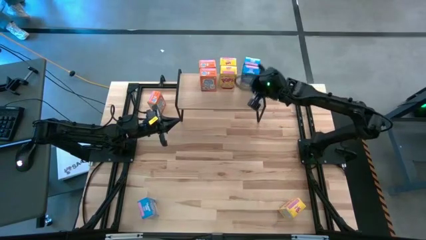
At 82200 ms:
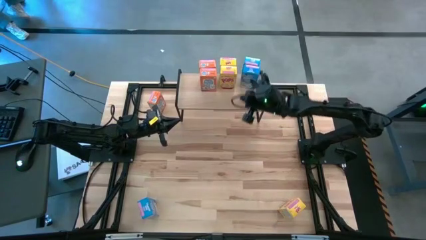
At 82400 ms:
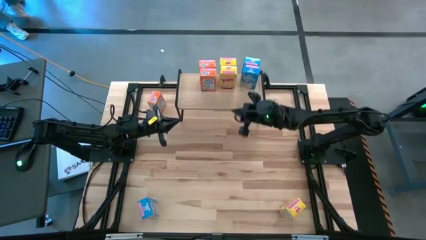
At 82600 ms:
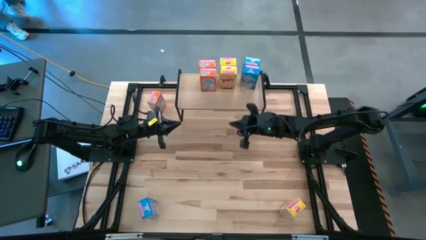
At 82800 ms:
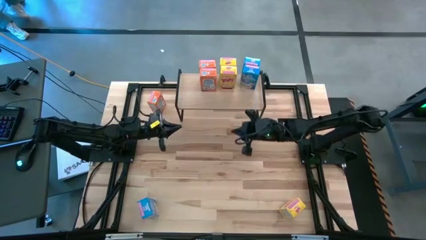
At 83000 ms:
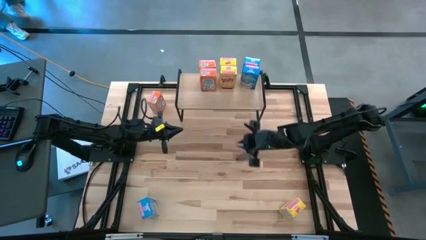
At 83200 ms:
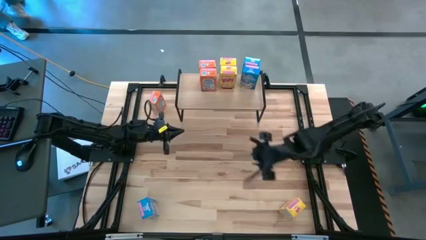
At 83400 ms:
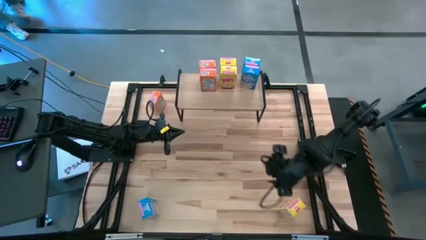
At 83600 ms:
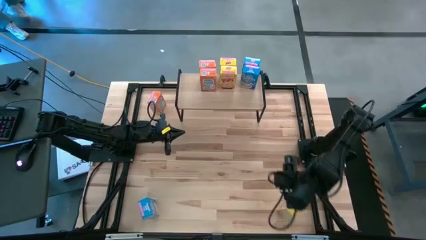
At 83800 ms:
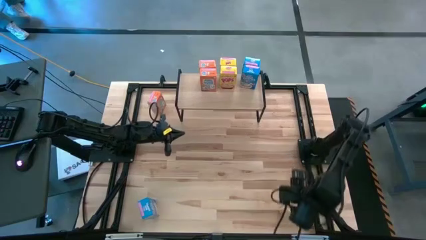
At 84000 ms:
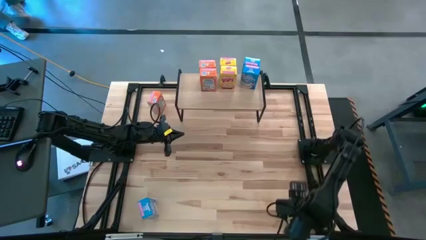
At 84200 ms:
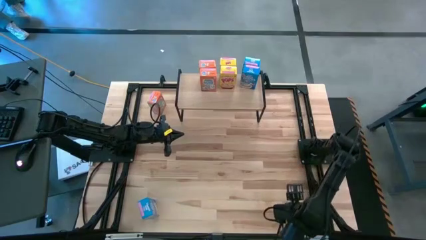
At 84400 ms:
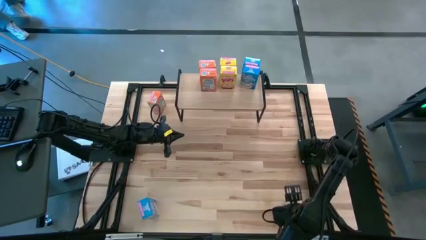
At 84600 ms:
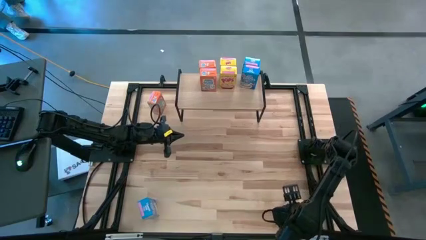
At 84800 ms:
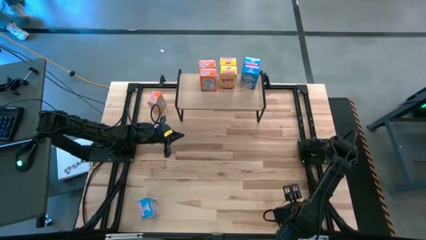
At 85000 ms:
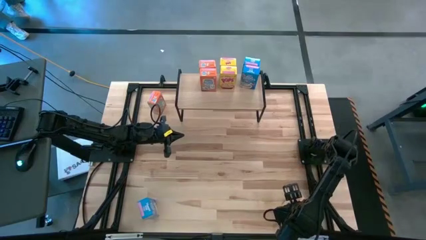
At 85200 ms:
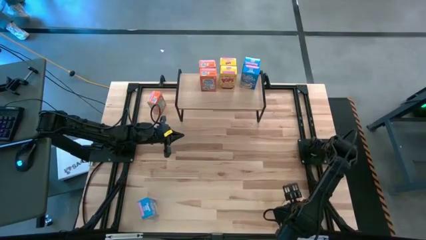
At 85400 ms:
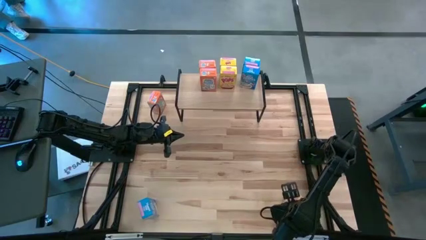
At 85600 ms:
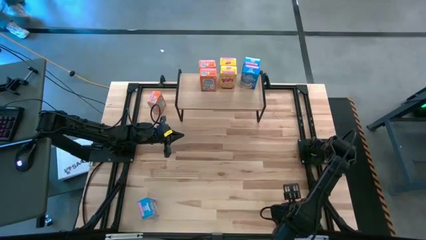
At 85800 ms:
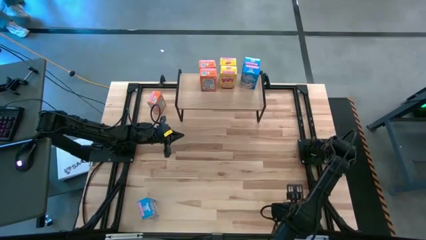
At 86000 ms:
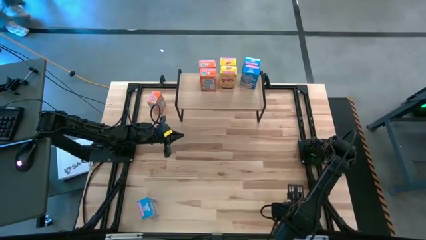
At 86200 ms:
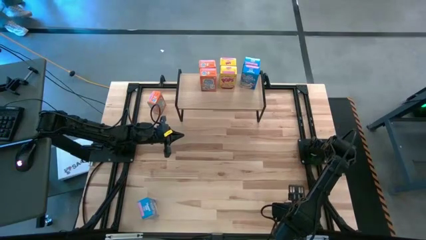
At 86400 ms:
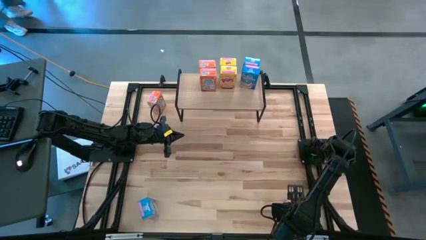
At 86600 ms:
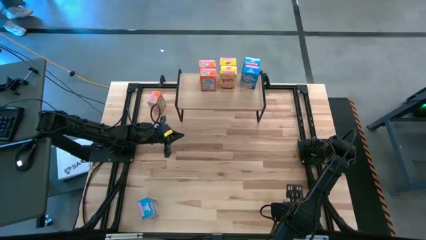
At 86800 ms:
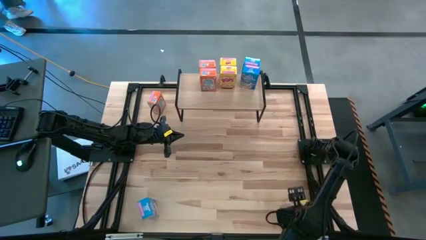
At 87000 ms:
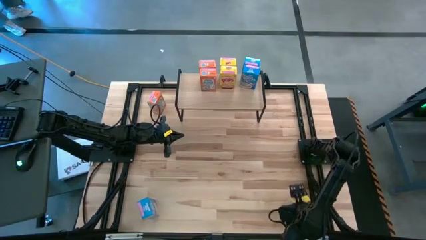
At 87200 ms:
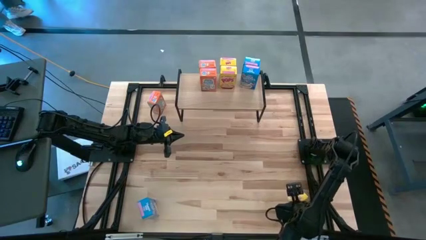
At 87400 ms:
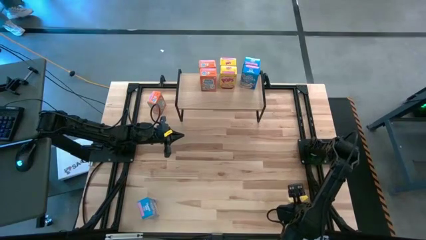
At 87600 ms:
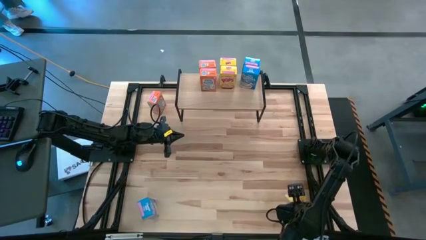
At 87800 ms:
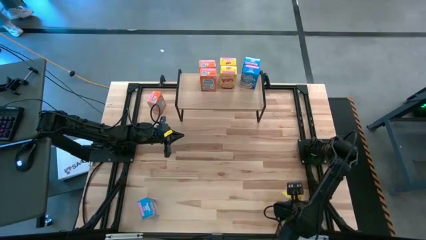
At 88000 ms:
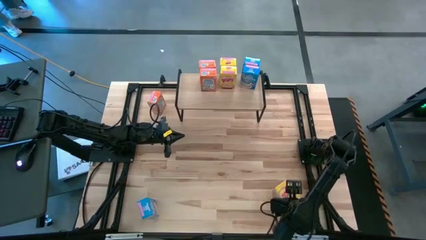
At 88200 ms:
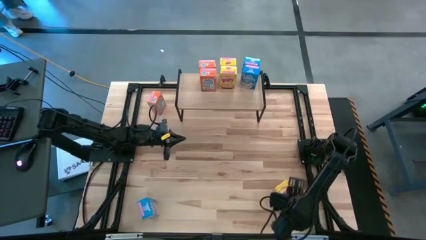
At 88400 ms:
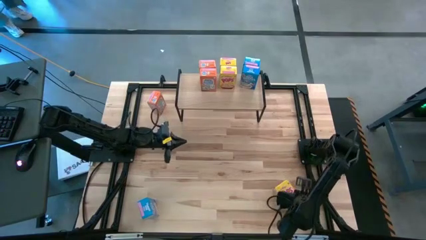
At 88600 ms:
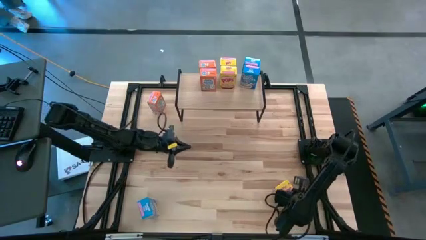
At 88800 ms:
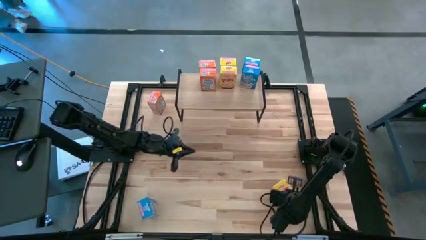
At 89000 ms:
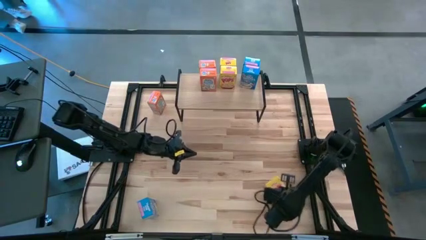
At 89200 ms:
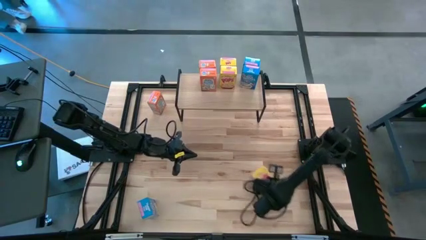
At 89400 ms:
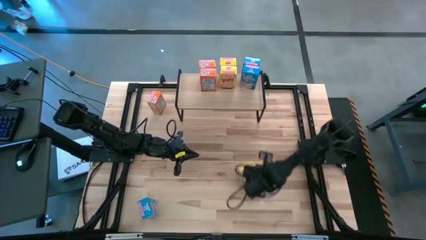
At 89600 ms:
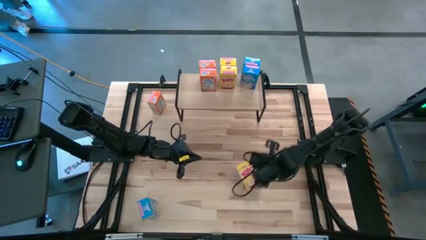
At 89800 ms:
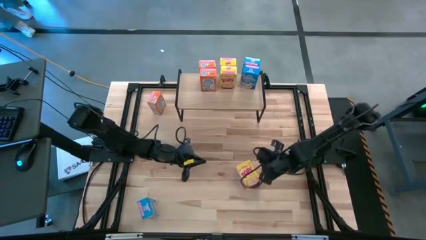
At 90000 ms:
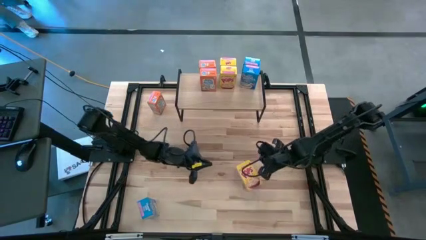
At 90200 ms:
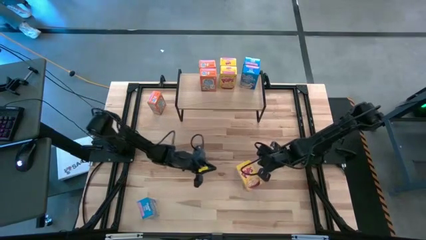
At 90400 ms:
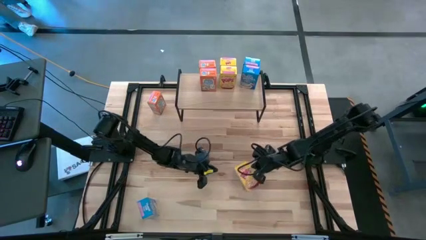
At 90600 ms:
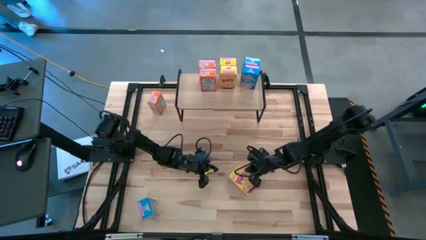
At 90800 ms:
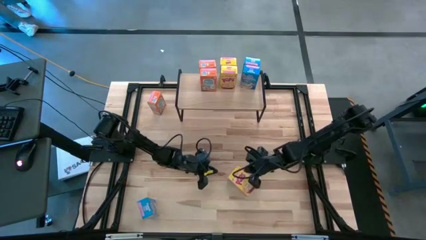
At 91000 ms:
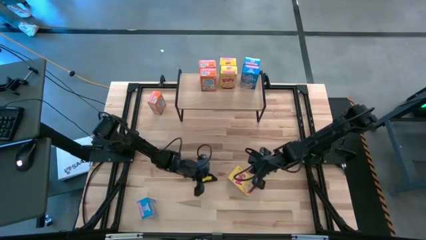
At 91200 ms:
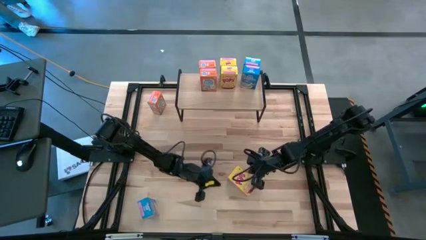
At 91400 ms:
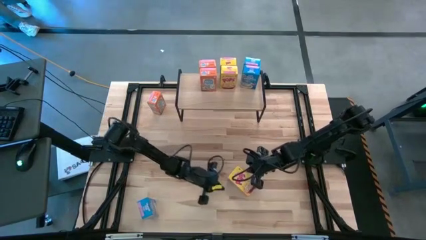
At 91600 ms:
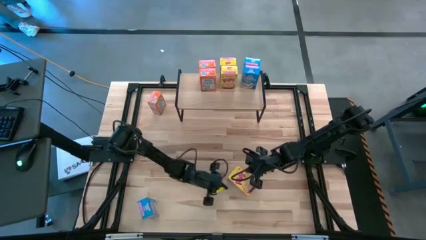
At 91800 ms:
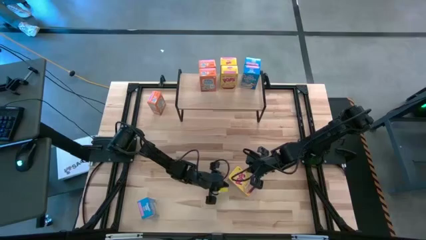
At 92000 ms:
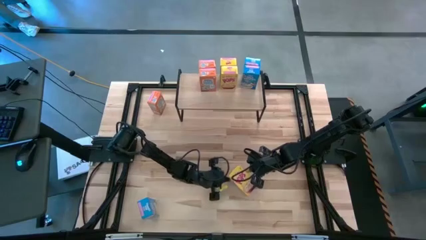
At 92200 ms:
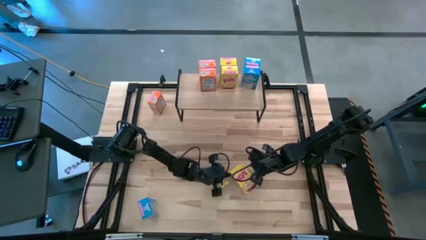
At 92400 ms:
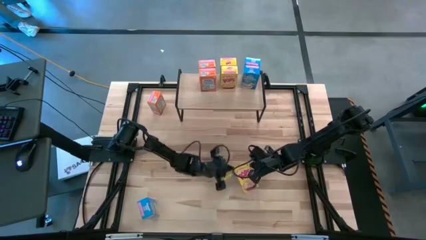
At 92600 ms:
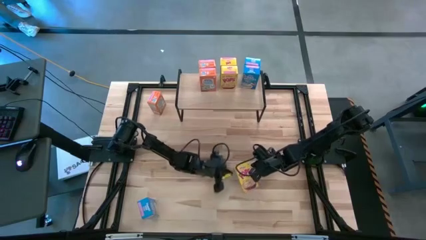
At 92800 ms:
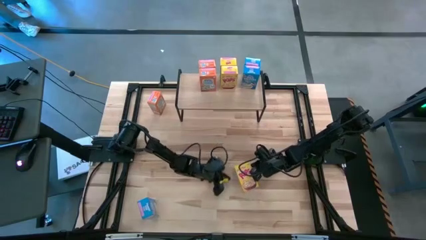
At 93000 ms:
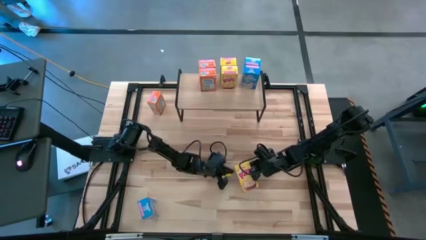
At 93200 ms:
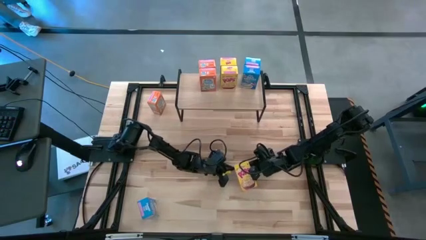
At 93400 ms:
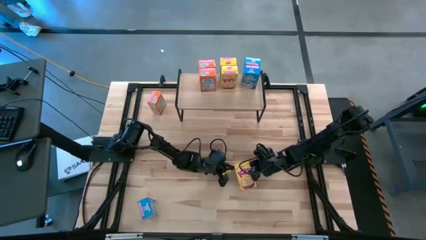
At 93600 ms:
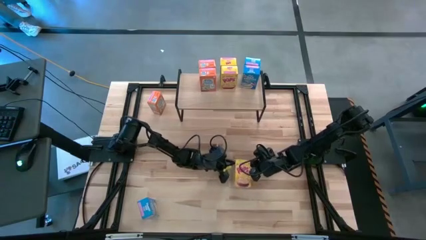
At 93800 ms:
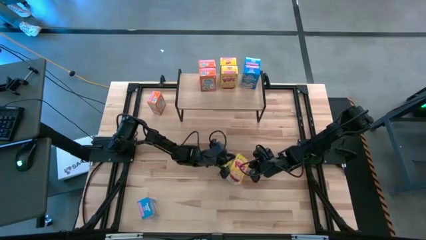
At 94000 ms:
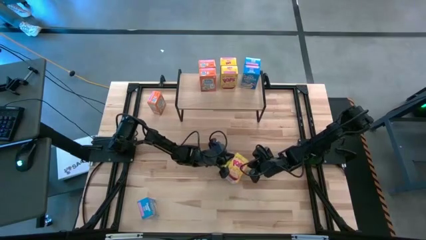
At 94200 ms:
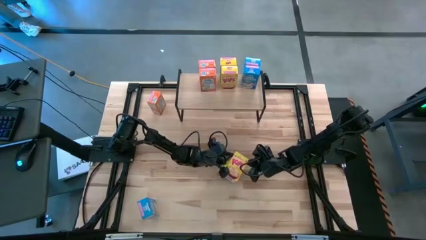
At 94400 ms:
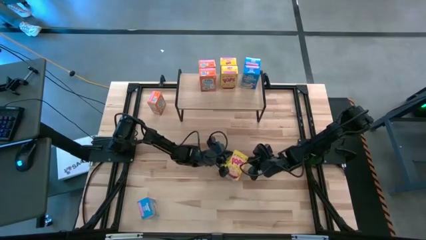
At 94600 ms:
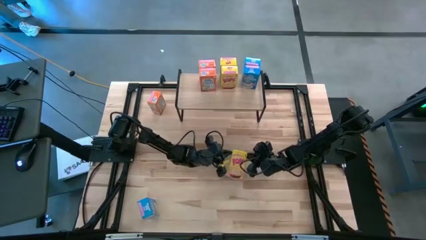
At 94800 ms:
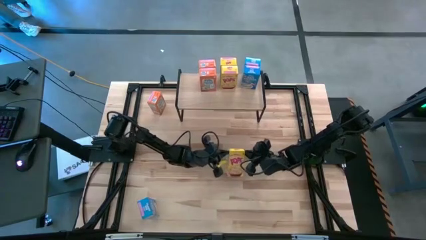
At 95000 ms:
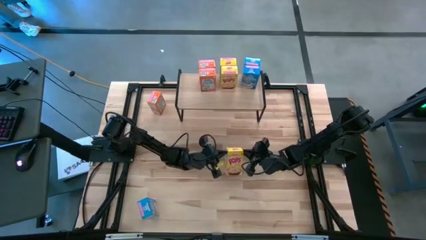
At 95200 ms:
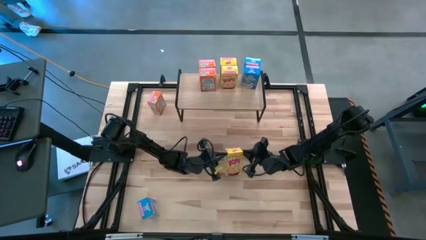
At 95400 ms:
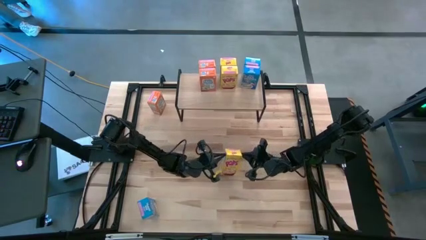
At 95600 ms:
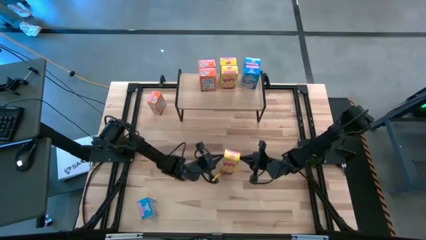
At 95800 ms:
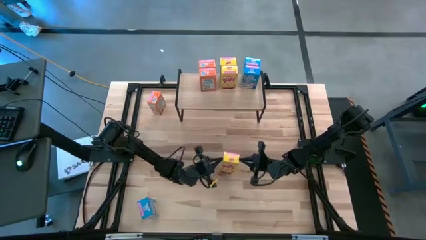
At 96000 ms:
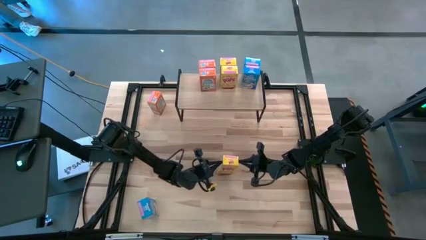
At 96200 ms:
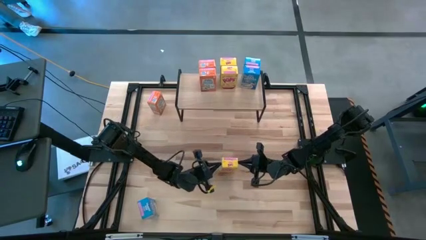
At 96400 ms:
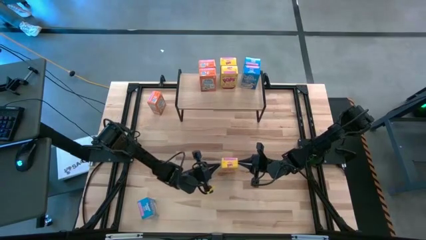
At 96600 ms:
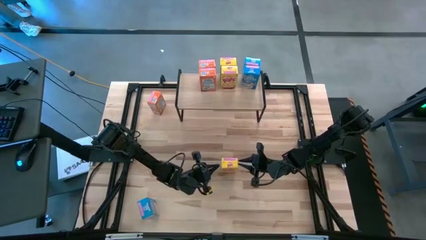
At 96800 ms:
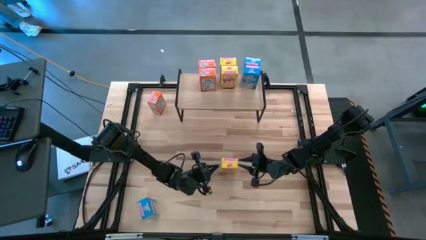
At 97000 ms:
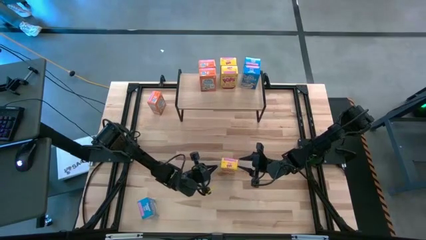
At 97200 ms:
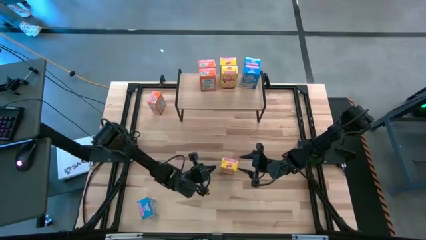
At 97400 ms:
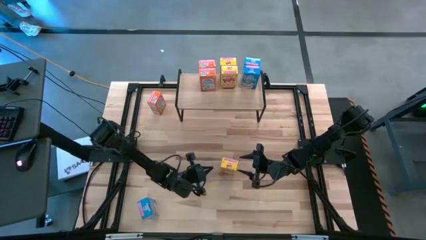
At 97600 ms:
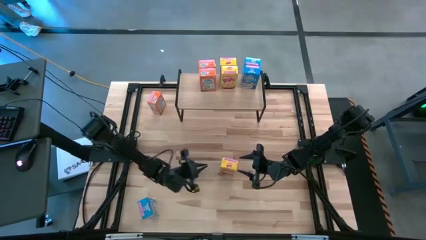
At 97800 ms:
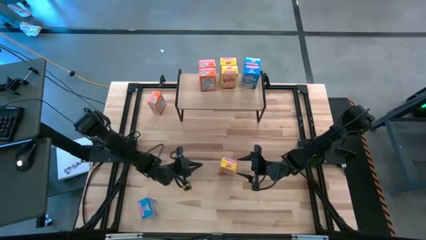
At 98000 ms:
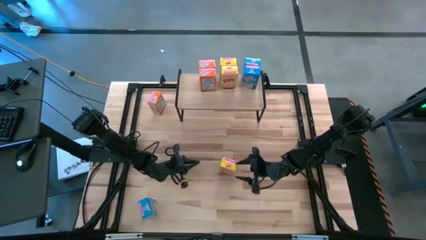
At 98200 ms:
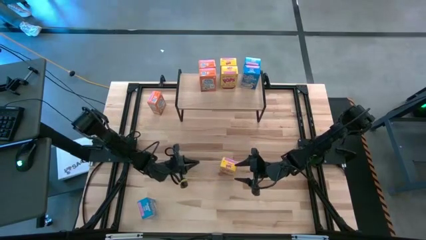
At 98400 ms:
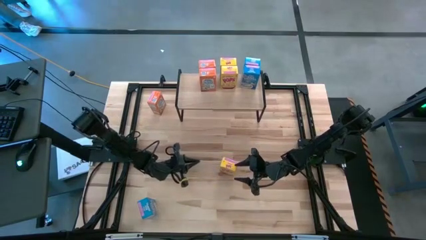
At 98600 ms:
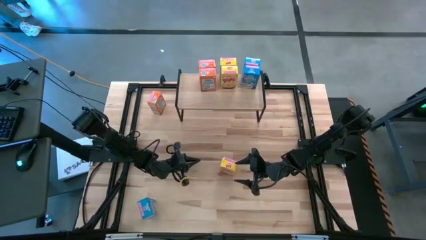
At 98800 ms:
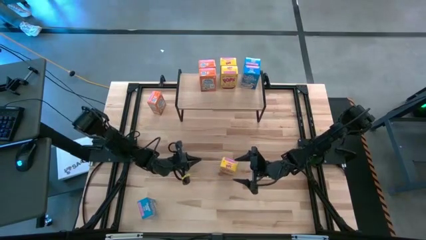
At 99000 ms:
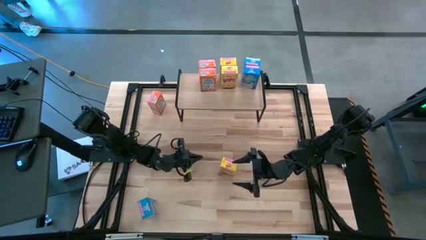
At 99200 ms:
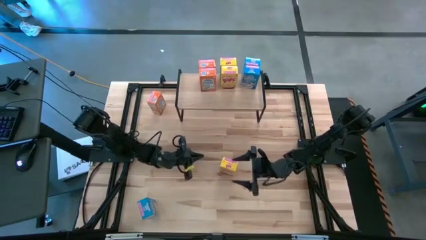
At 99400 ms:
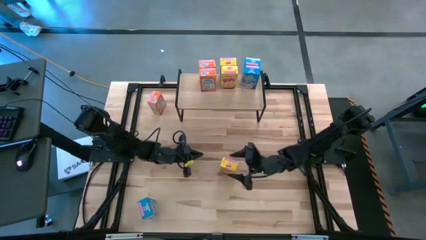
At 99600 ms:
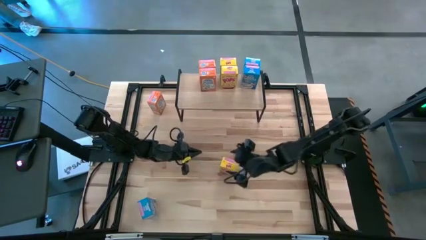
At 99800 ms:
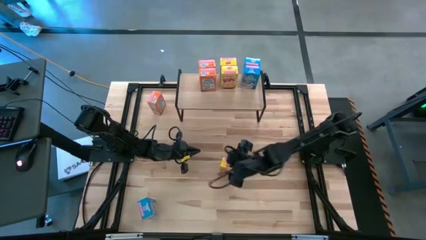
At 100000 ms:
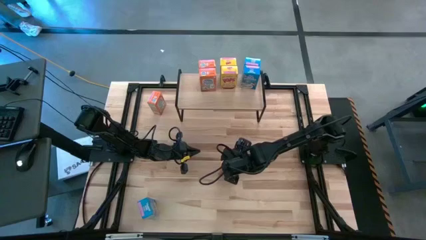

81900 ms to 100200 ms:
Task: Stack cereal on shelf
Put the yellow cereal box on the shelf aligned with the other yellow cereal box
